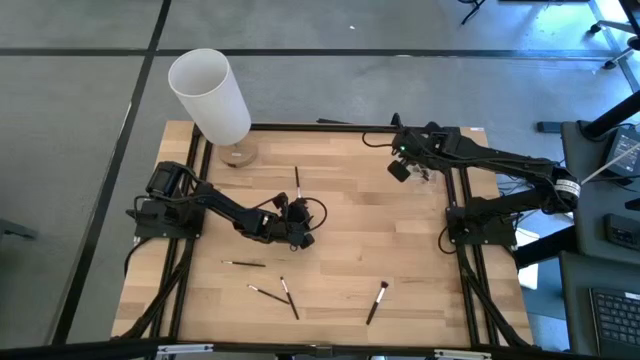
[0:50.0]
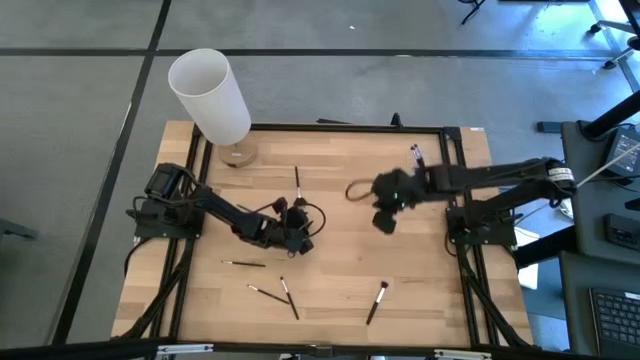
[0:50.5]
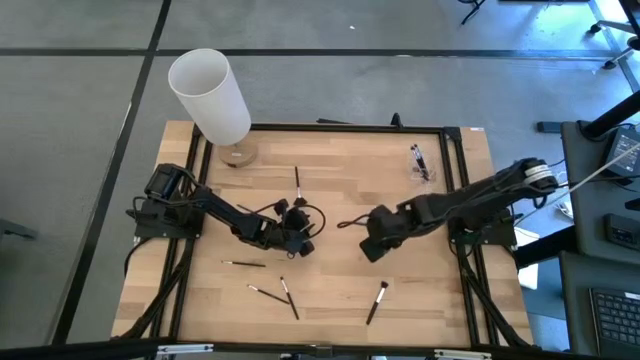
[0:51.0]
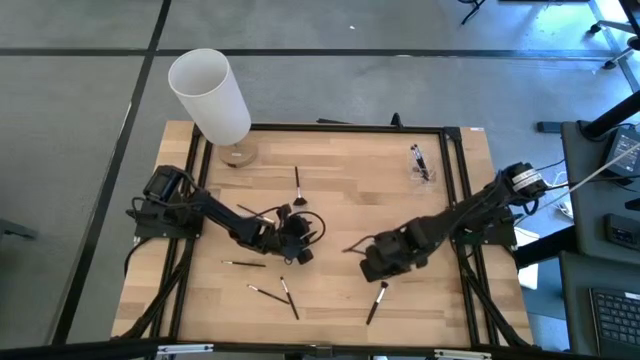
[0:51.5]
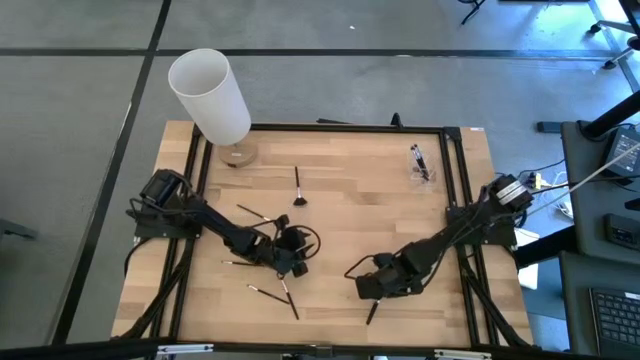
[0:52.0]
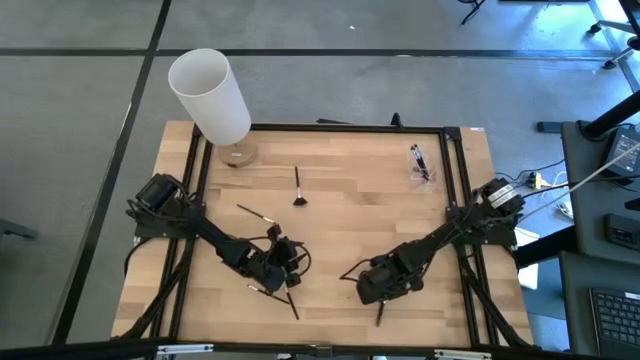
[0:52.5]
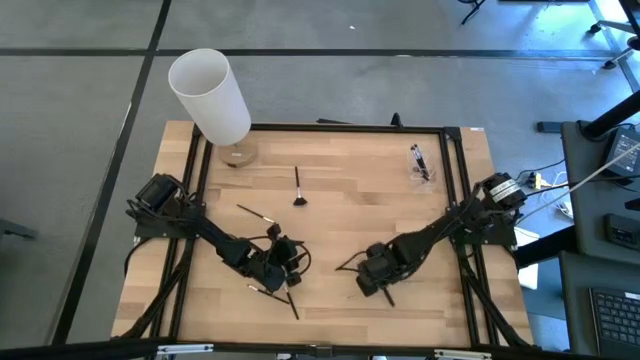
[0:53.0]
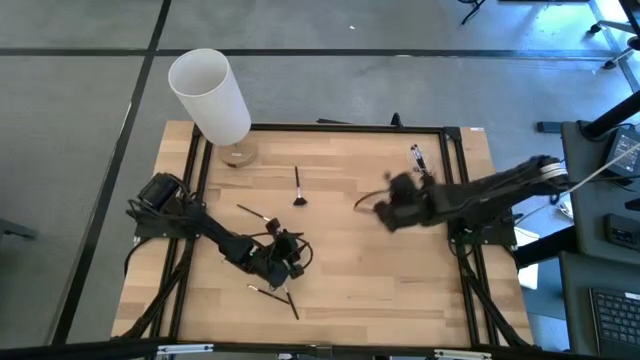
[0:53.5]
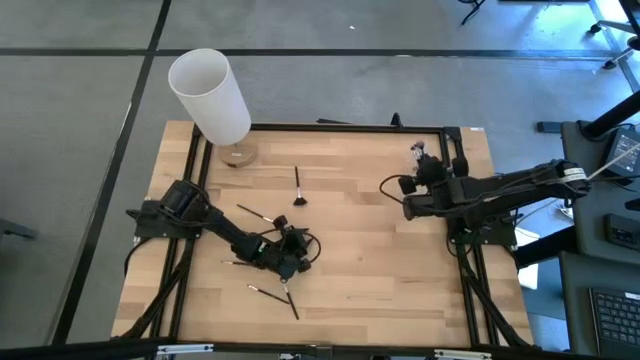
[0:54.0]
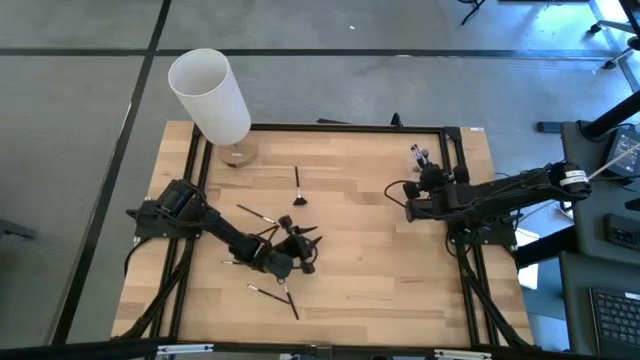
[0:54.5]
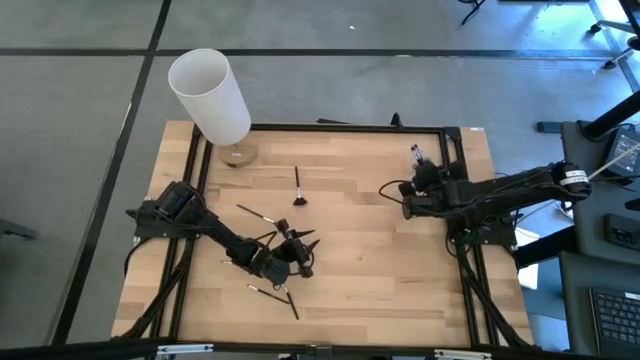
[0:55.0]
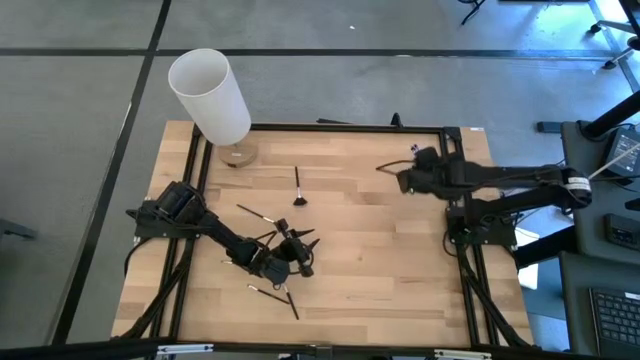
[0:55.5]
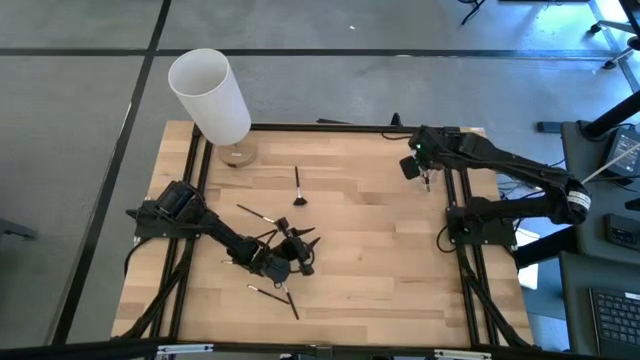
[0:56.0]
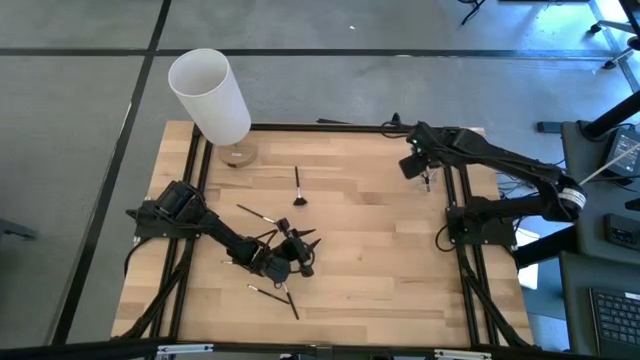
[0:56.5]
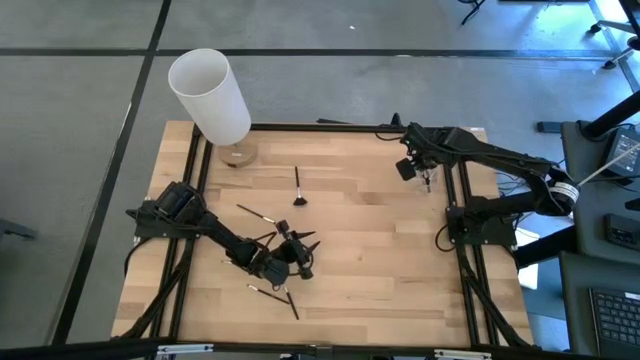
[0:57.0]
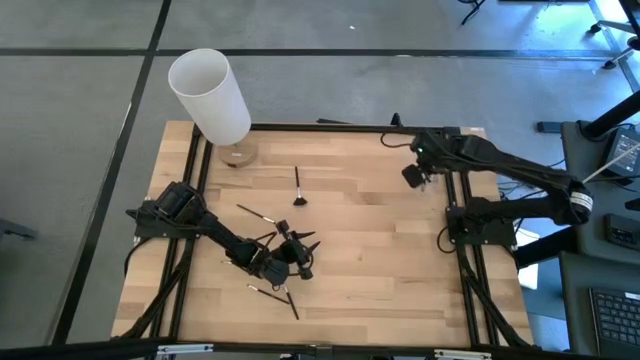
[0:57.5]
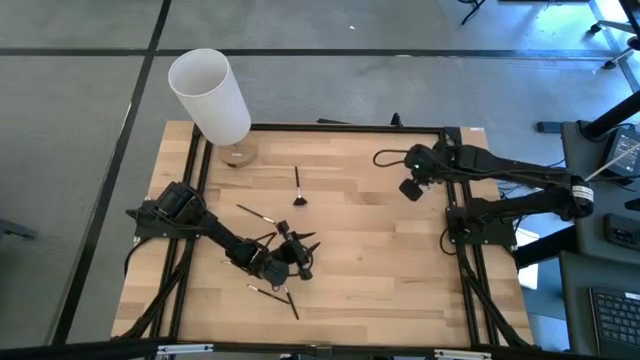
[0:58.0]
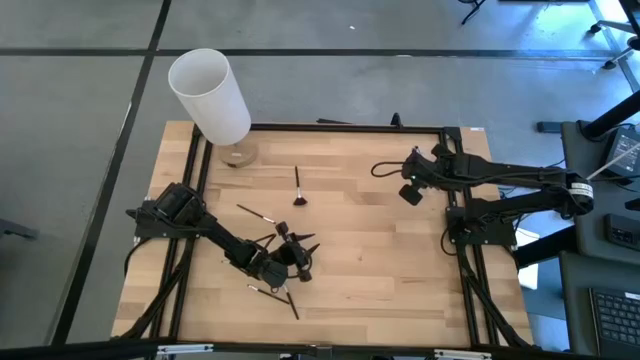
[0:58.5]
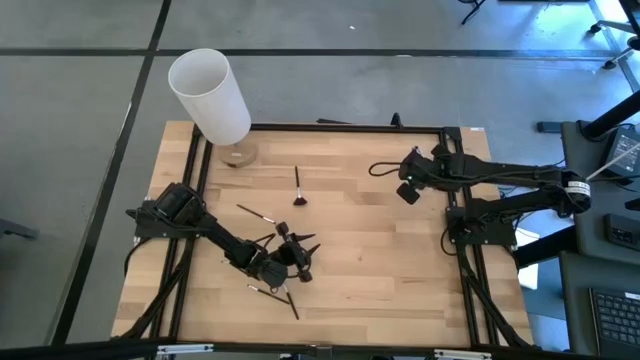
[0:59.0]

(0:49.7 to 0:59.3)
Task: Sort items
Put the powder brush into the bottom section of the transparent organizer

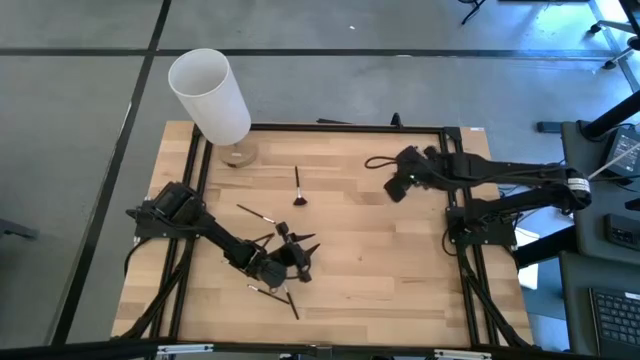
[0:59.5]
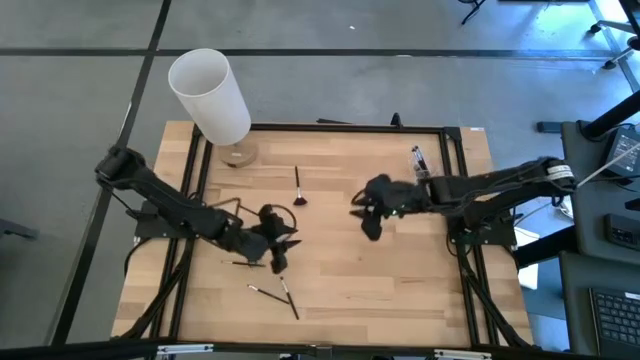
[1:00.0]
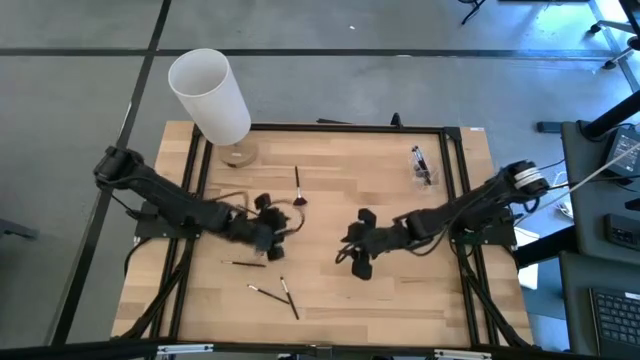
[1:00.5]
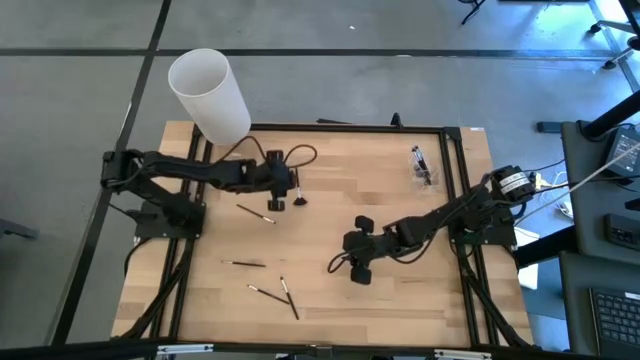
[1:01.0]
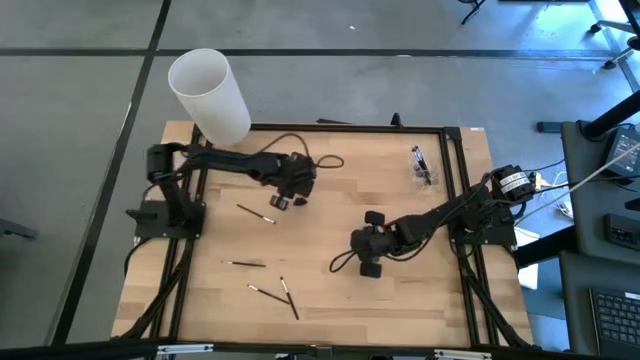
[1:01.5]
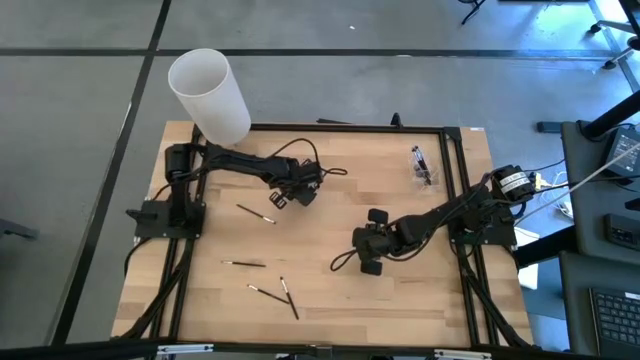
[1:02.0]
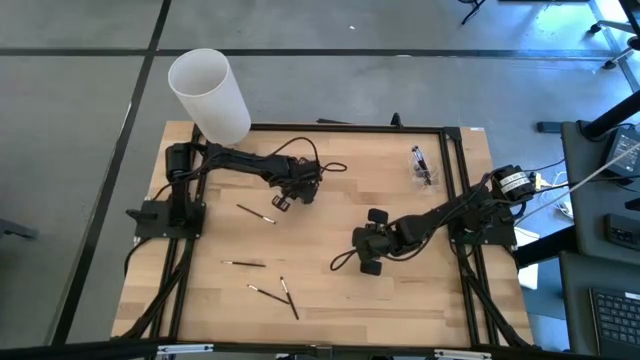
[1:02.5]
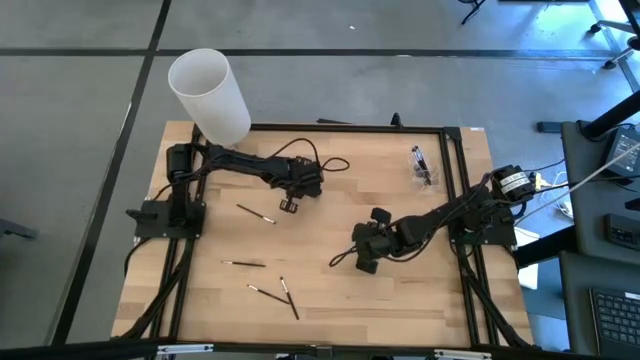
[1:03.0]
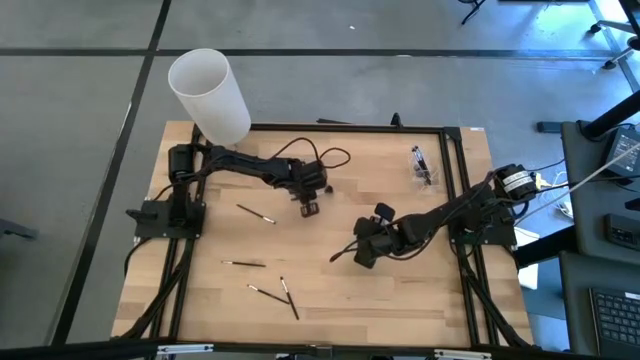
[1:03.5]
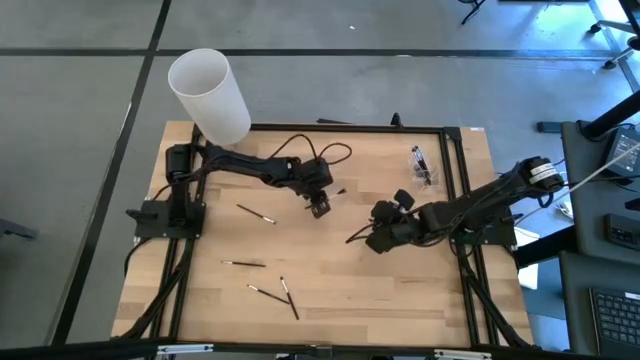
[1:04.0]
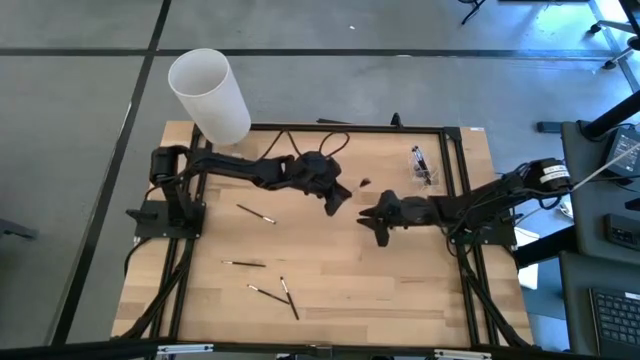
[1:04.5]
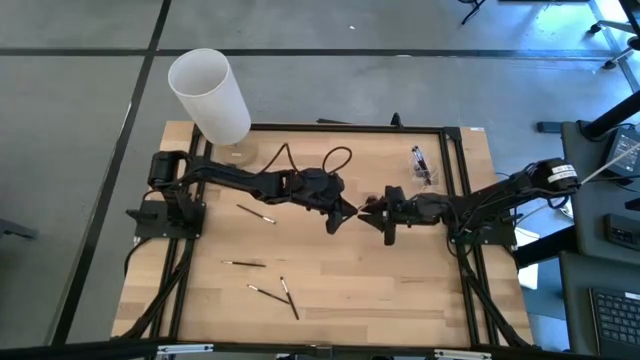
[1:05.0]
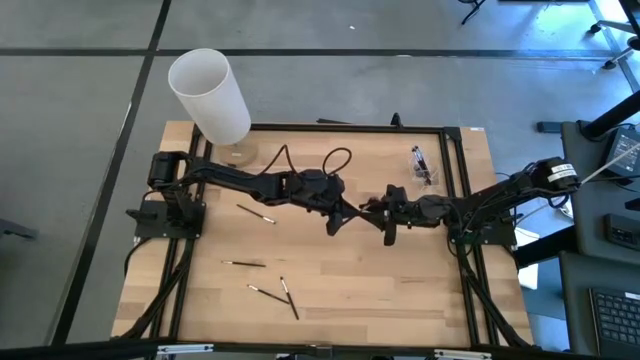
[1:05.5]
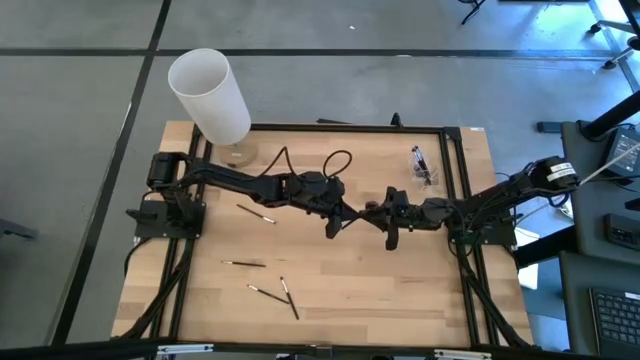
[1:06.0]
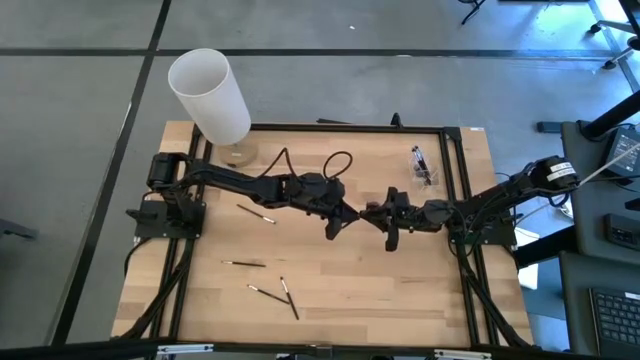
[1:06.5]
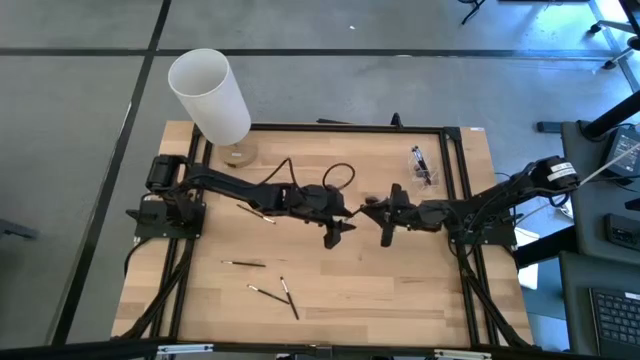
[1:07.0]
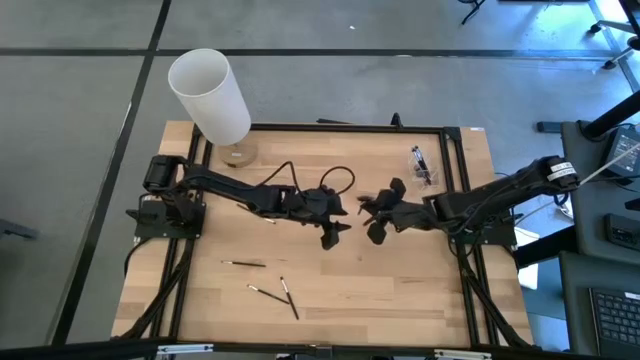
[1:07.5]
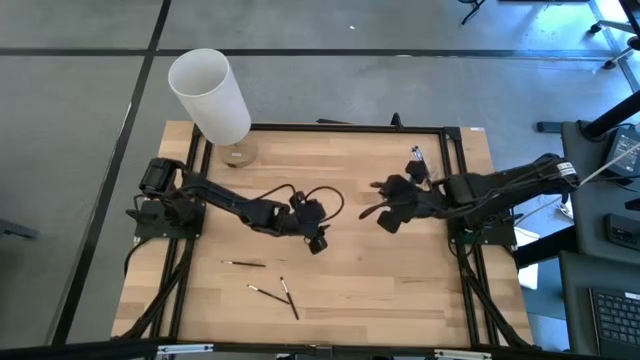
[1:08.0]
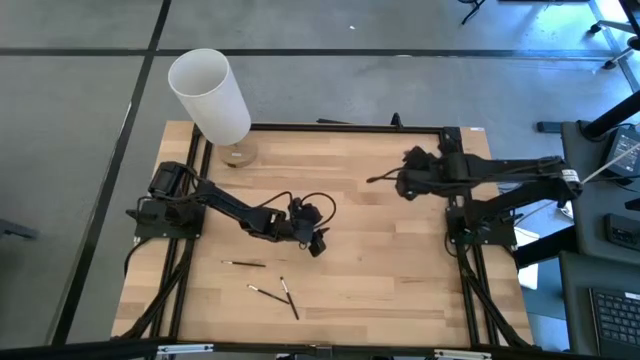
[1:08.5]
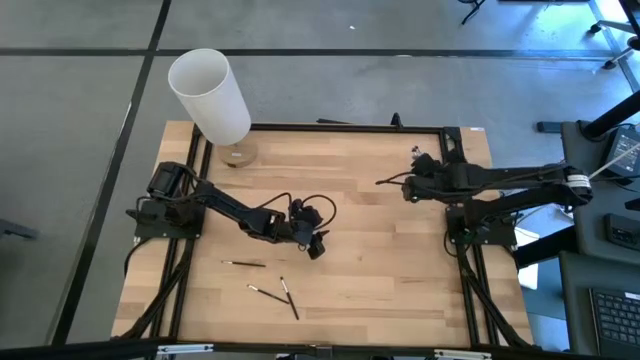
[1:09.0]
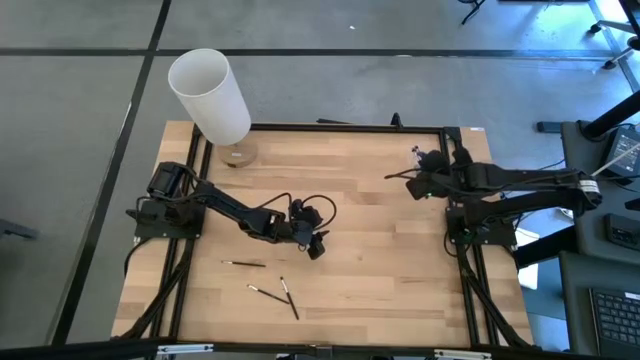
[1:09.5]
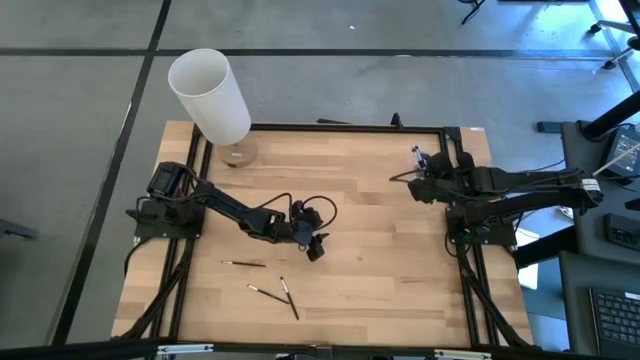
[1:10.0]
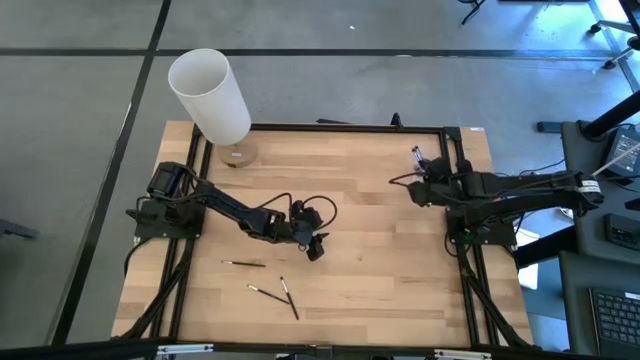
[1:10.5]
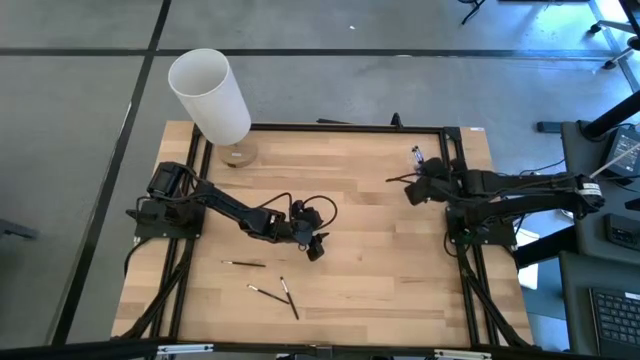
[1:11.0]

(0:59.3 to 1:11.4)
Put the highlighter brush into the bottom section of the transparent organizer
